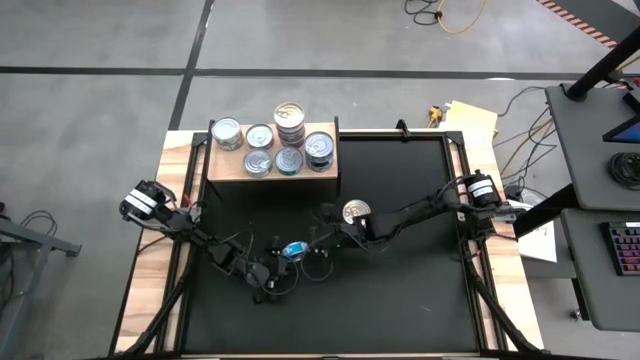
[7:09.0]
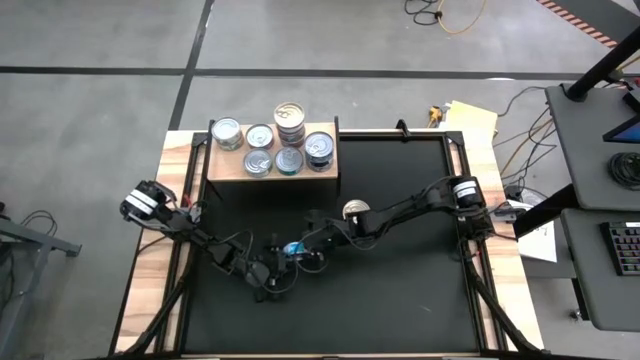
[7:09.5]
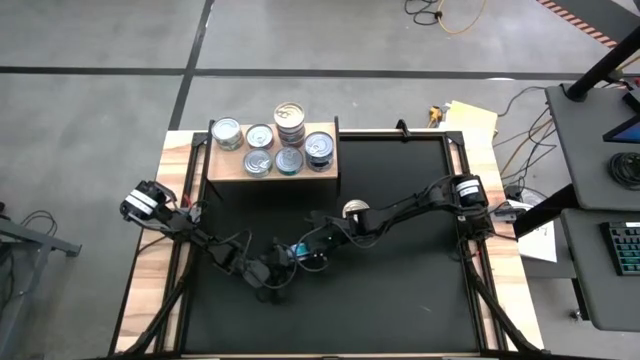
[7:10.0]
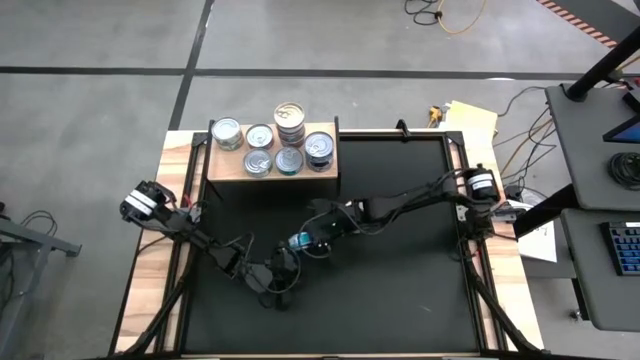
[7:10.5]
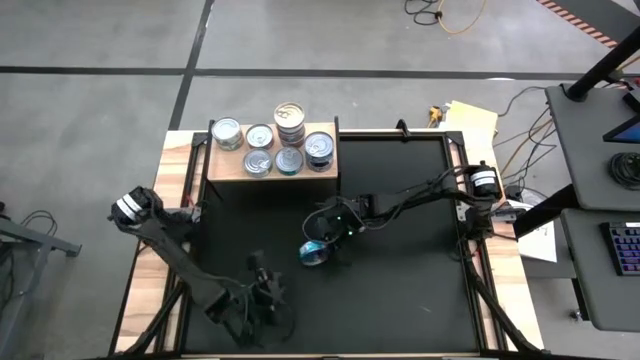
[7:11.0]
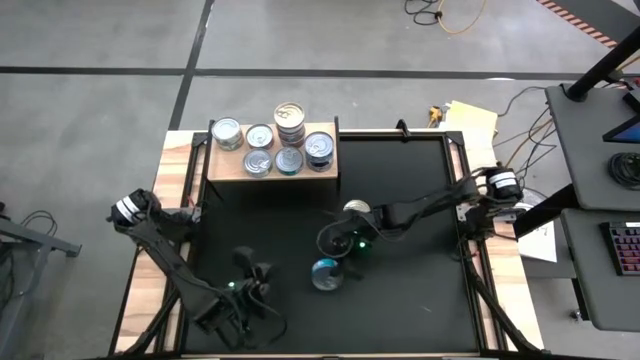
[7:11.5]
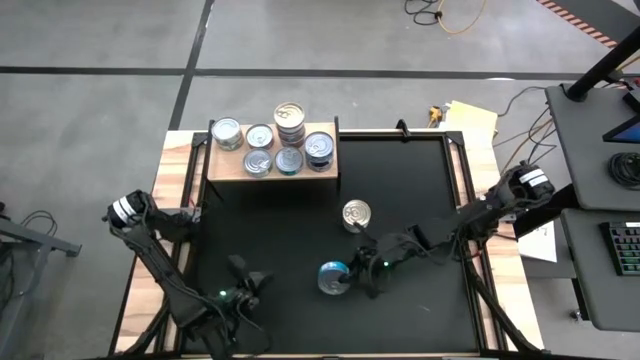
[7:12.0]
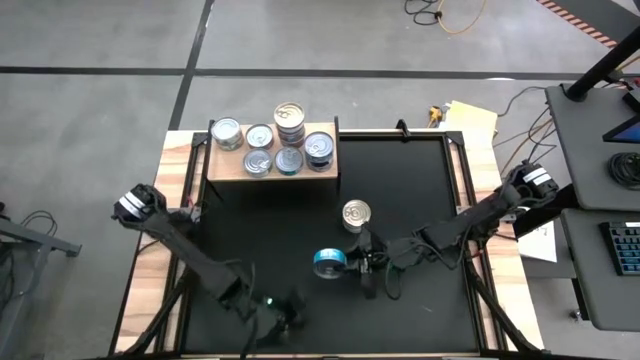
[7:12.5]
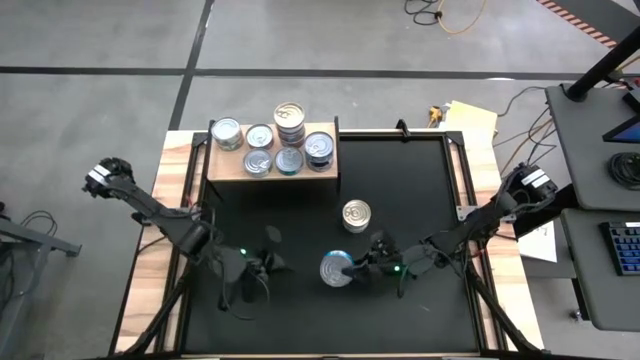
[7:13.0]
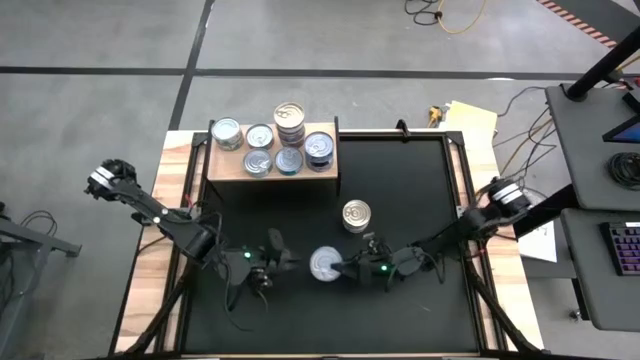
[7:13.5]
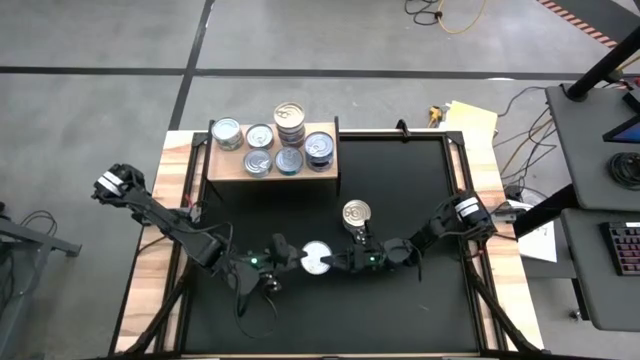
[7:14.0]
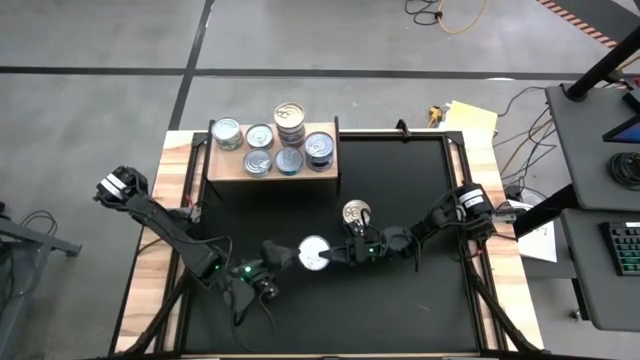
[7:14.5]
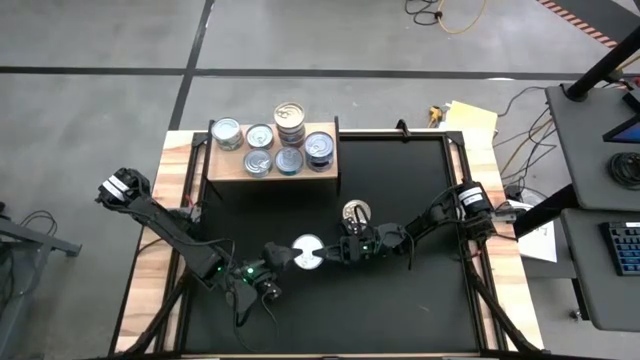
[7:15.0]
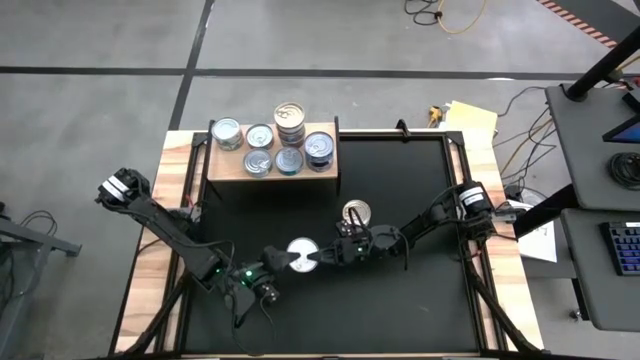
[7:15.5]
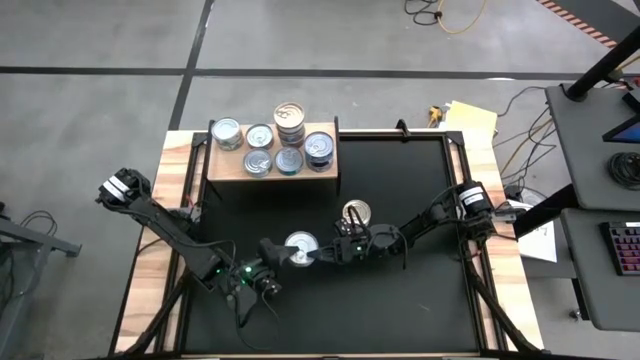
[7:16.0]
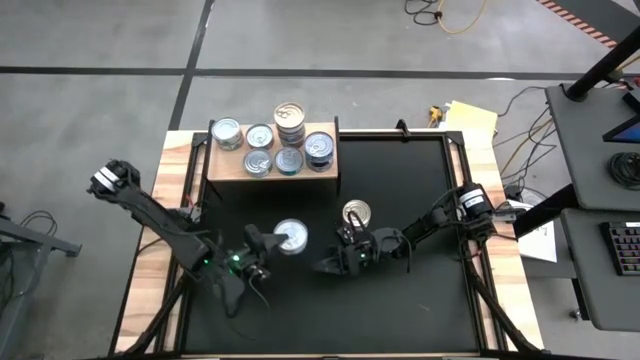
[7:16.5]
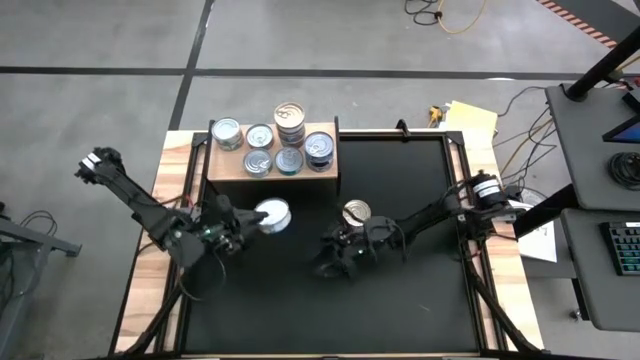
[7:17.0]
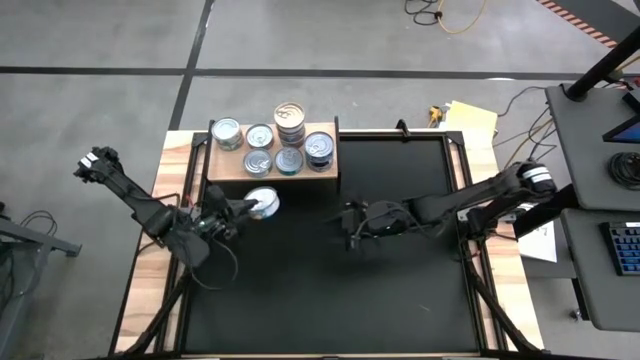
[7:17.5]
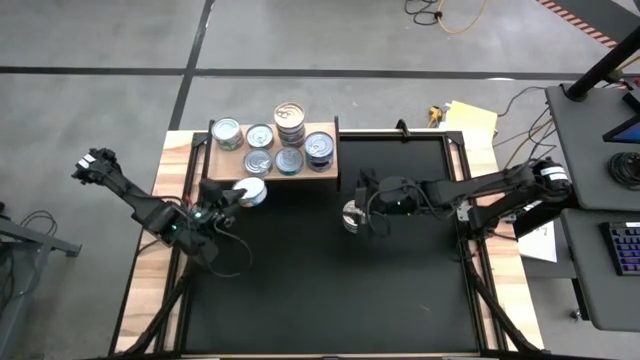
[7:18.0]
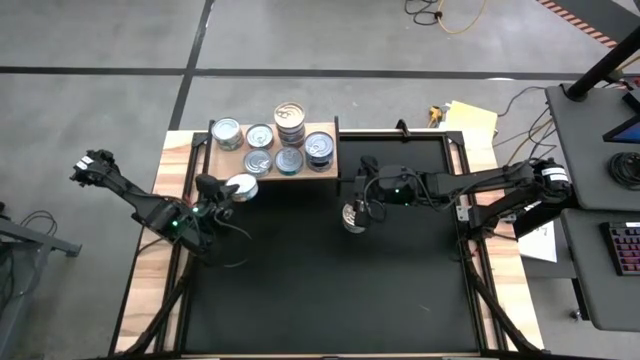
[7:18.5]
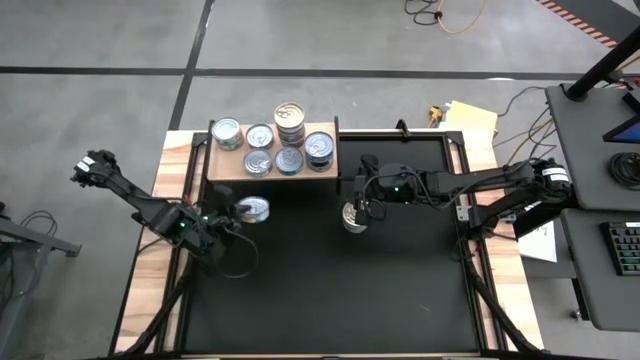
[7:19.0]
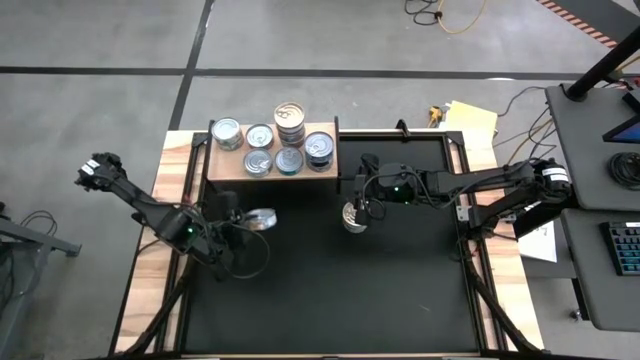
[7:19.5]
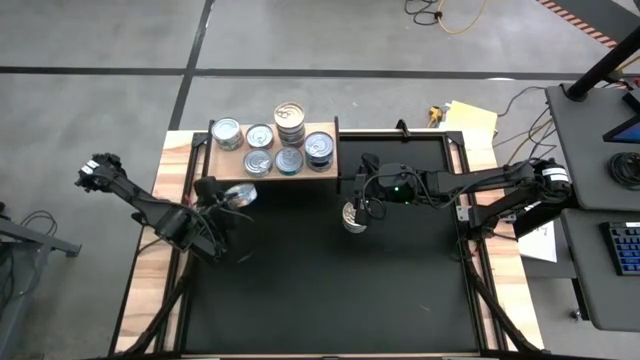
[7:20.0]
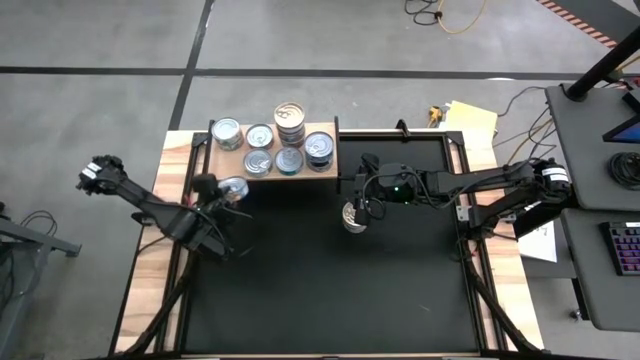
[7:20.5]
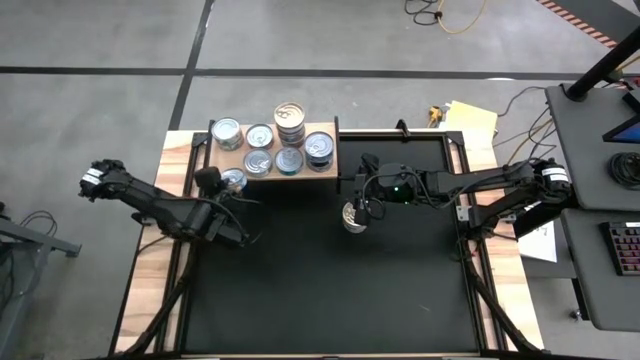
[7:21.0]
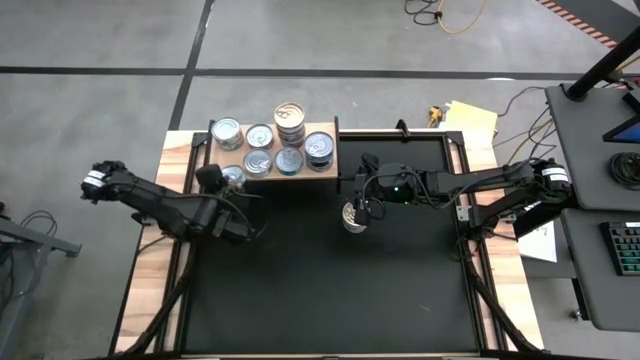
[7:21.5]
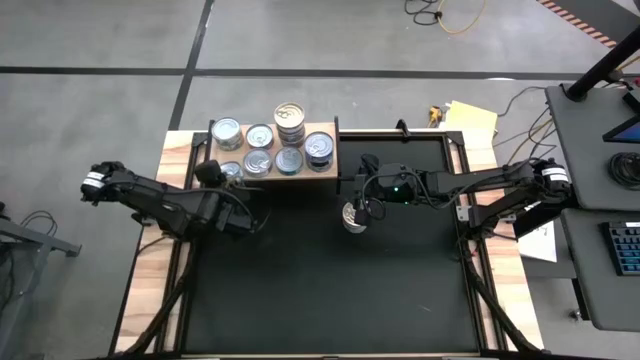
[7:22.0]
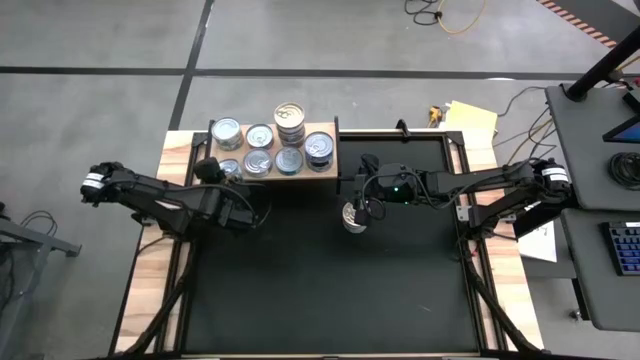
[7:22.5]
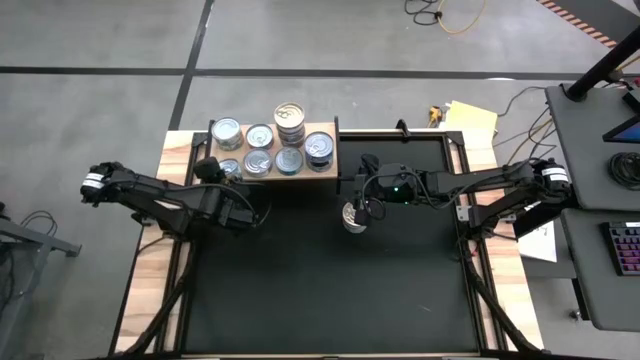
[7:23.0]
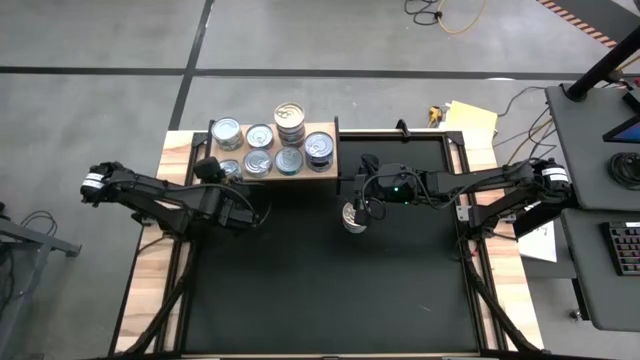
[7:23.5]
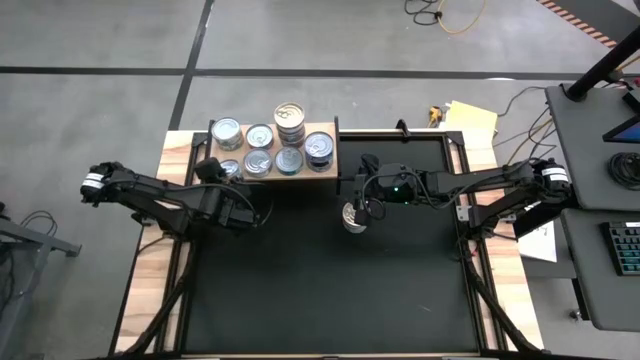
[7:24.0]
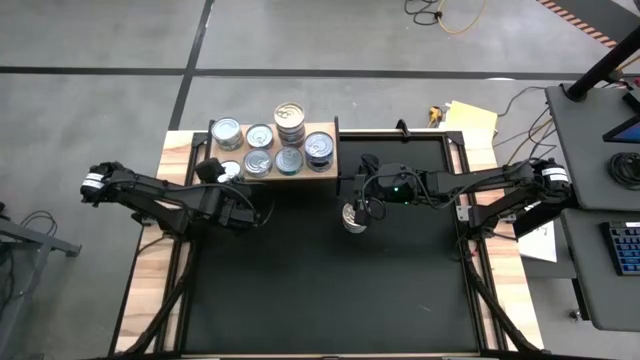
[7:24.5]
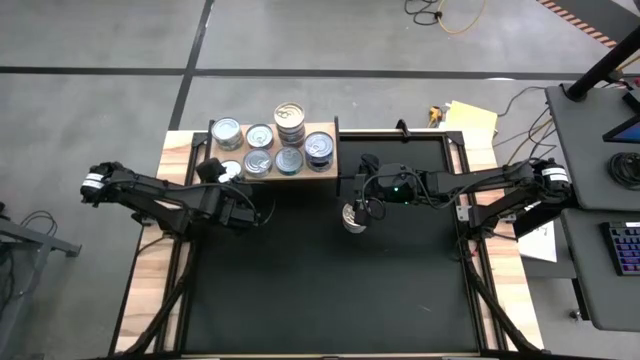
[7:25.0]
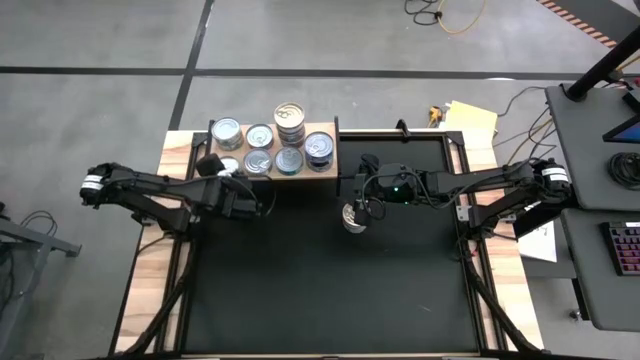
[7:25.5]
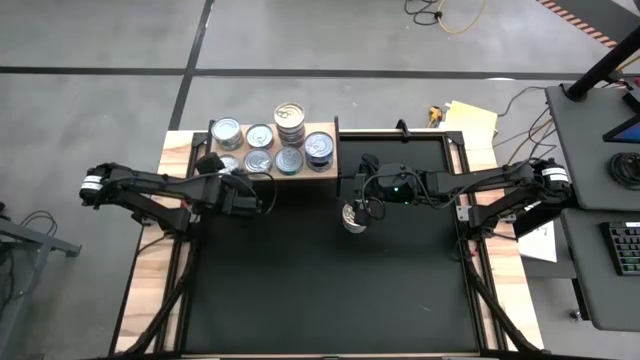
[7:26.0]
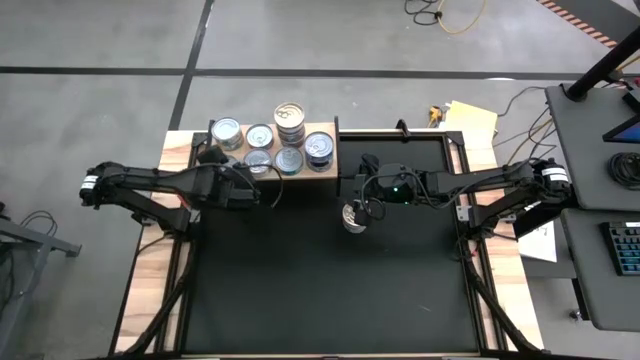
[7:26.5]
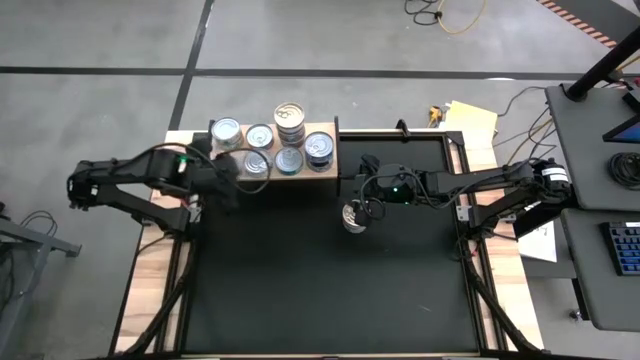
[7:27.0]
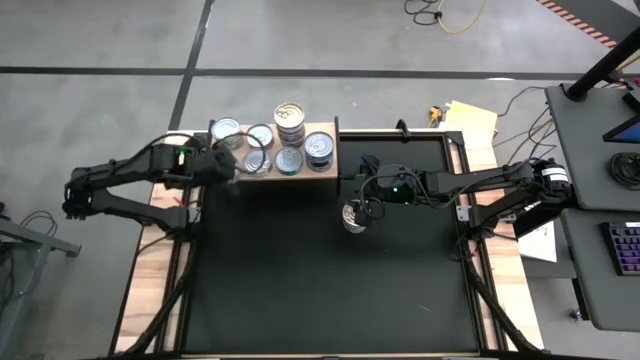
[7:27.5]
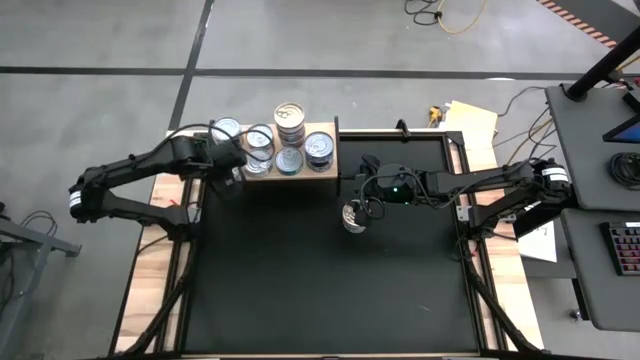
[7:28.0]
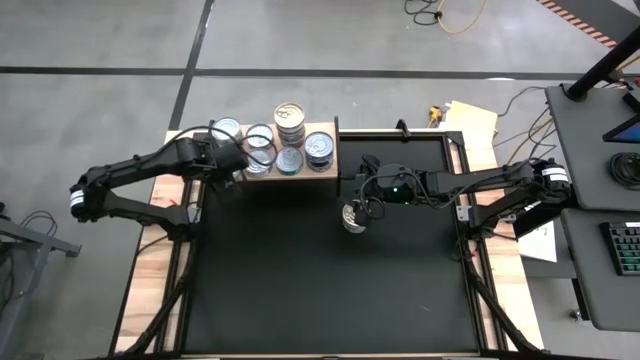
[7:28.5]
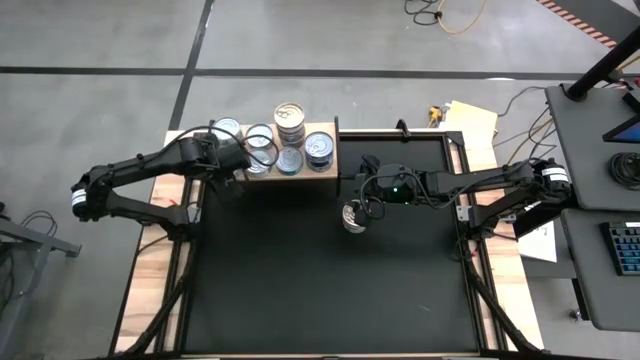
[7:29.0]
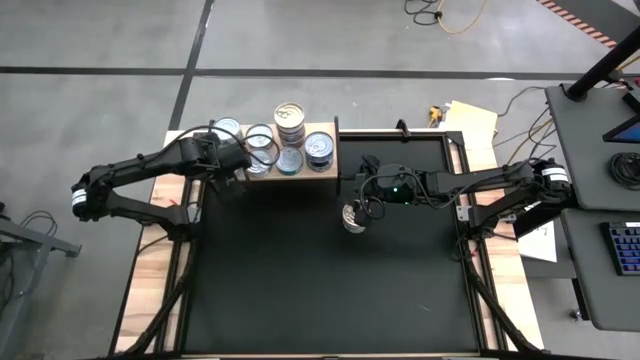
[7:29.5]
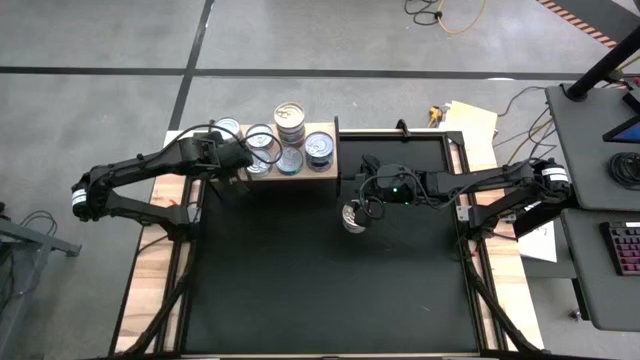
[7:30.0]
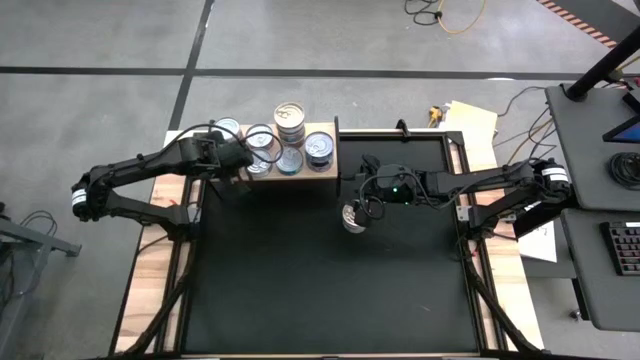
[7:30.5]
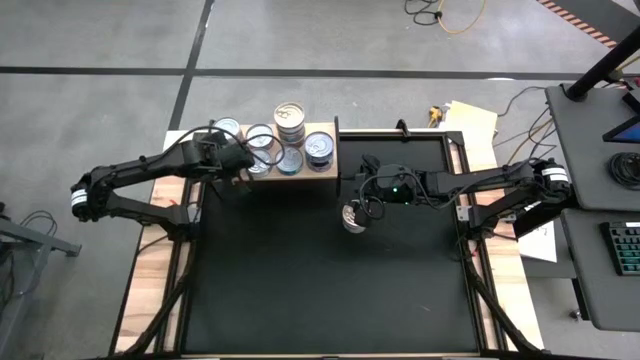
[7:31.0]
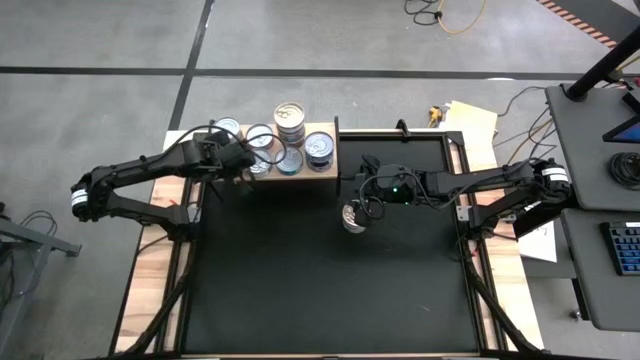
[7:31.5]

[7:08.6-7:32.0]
Task: Stack canned seafood by type on shelf
Put the yellow/blue tuna can on the shelf
